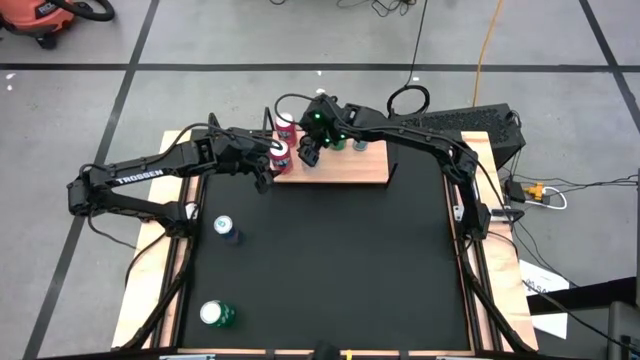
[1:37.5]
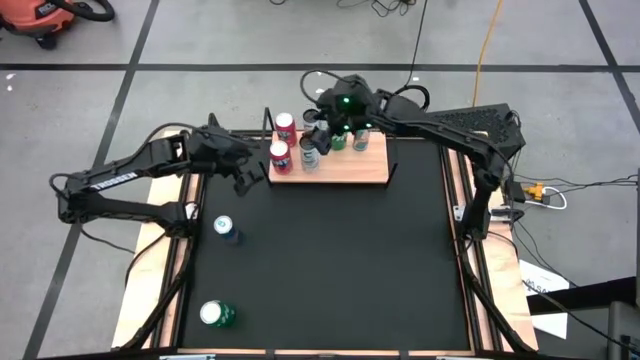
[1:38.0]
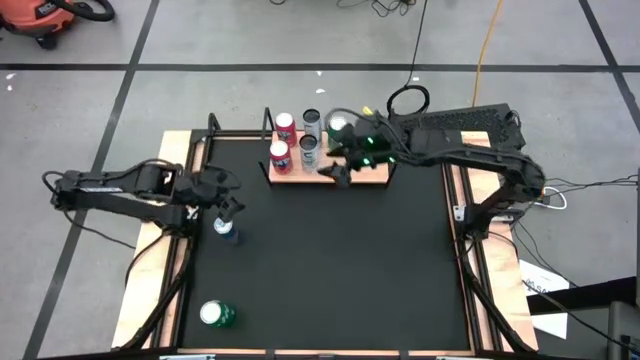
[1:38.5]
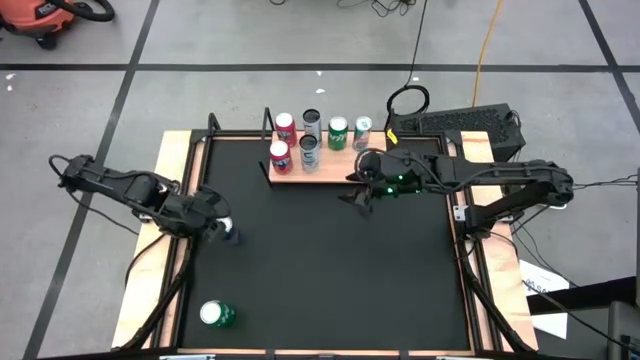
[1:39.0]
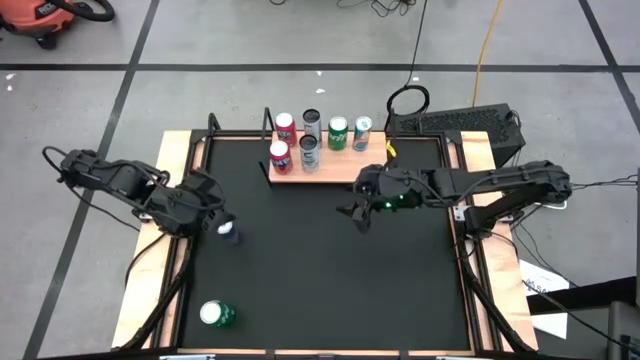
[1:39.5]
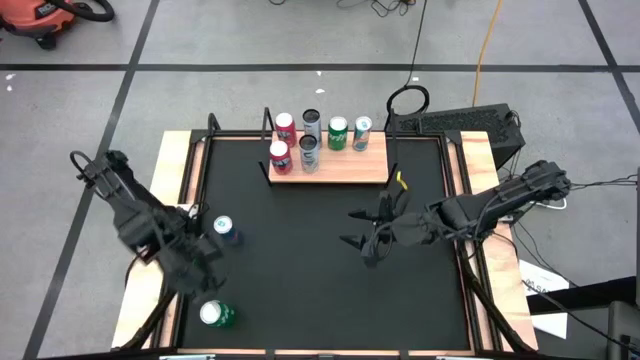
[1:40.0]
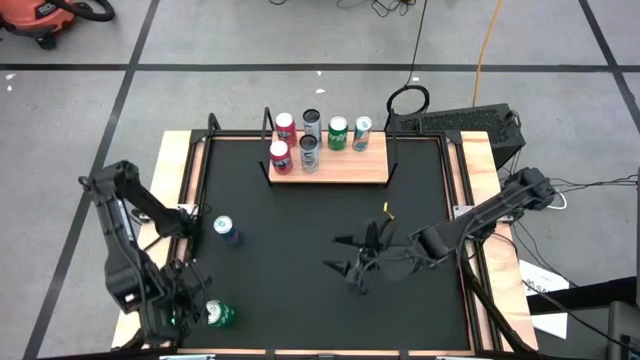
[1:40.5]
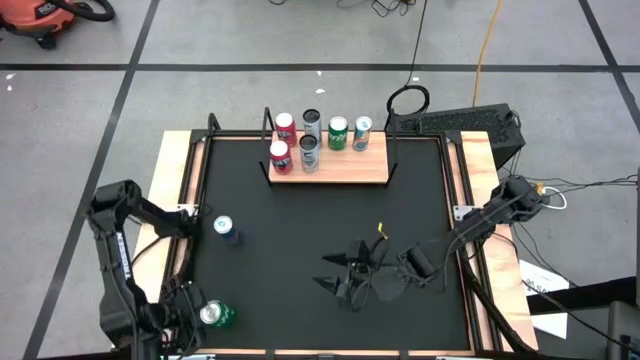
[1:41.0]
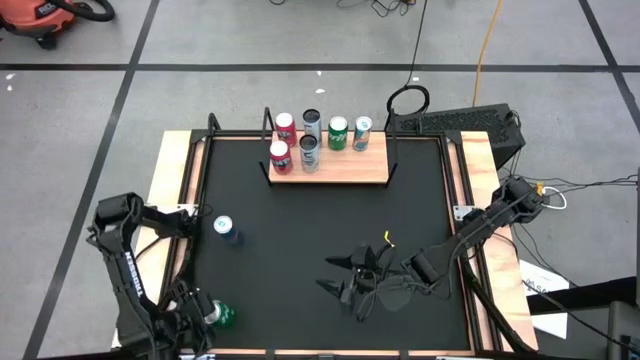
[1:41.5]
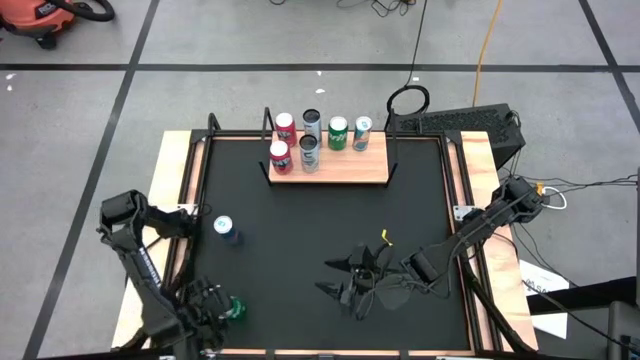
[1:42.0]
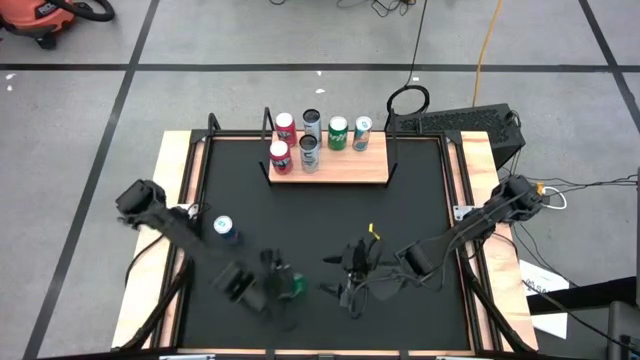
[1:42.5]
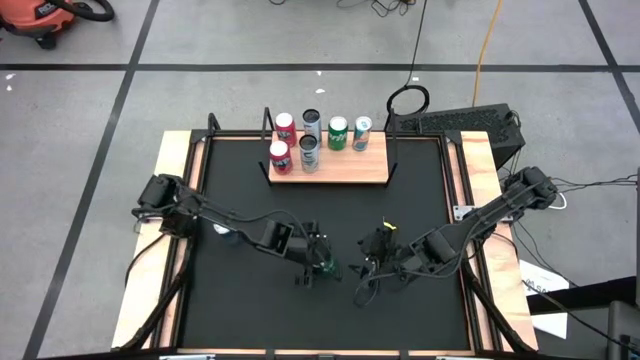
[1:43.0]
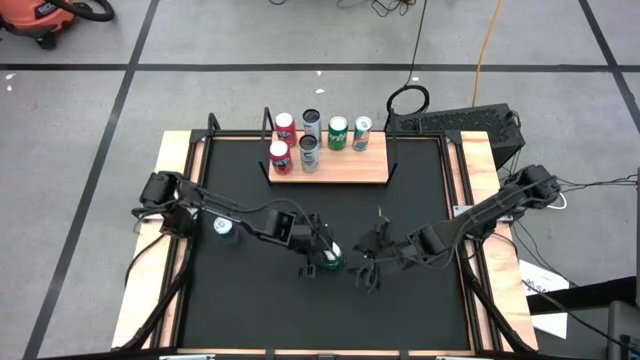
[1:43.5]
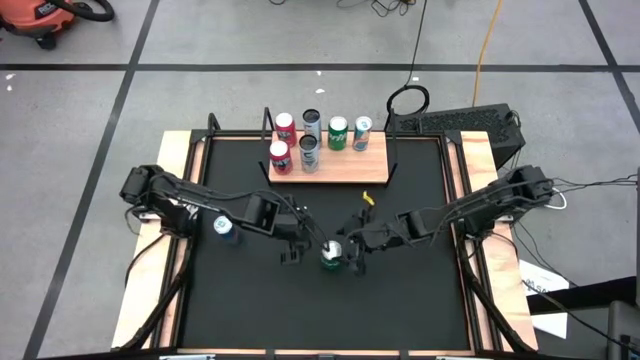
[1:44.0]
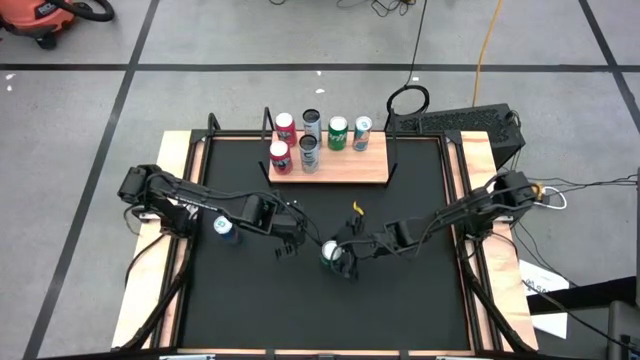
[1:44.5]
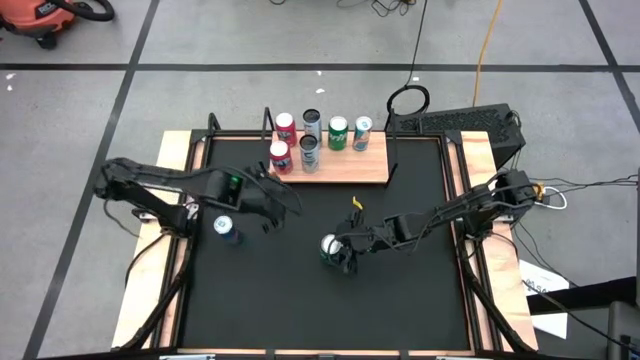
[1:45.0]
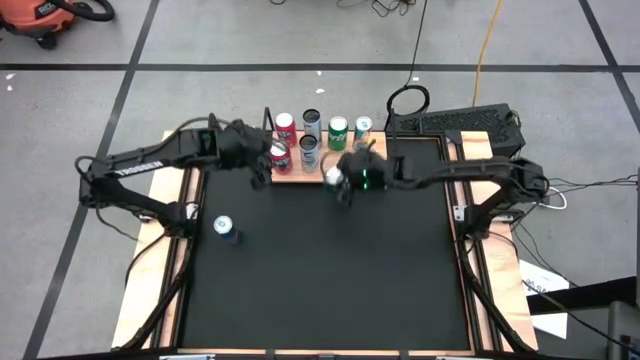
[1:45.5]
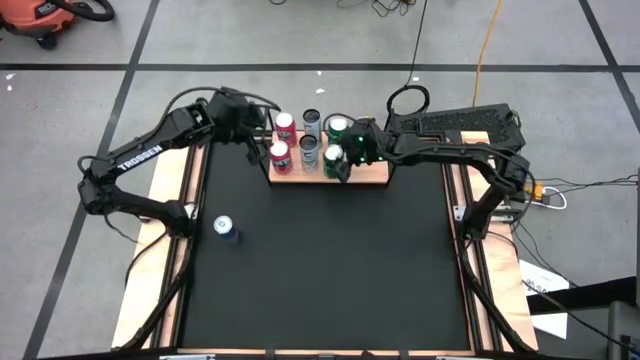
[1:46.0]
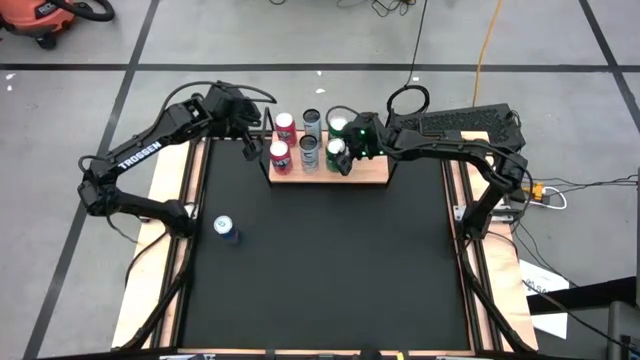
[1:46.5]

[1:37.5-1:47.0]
Task: Place canned beverage on shelf
Put the green soda can on the shelf aligned with the other green soda can

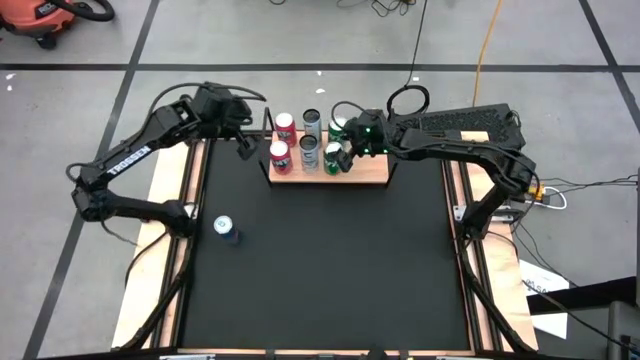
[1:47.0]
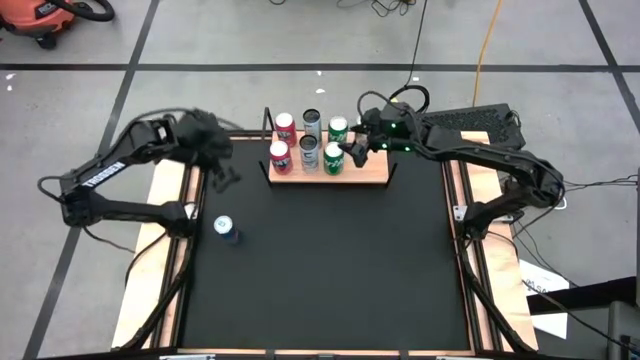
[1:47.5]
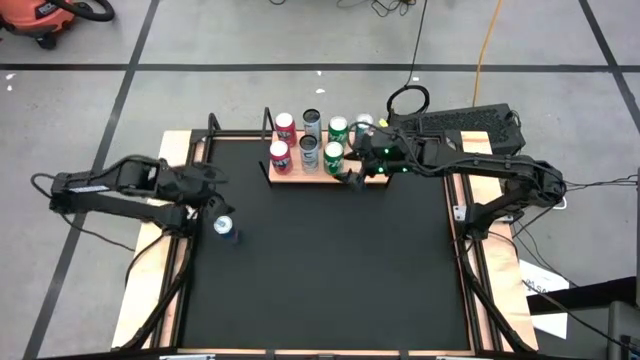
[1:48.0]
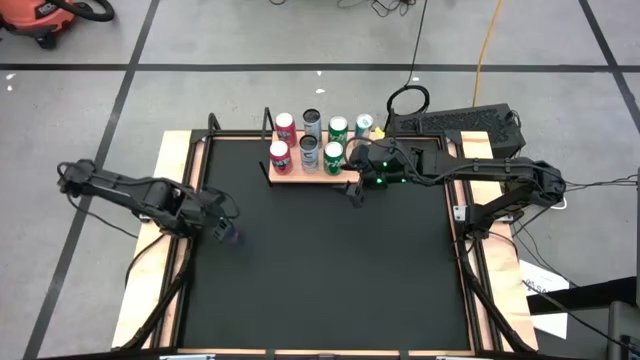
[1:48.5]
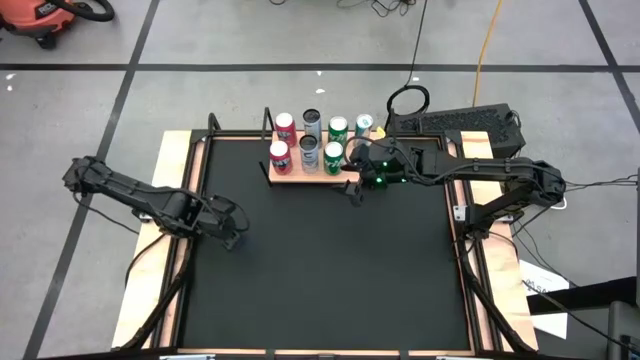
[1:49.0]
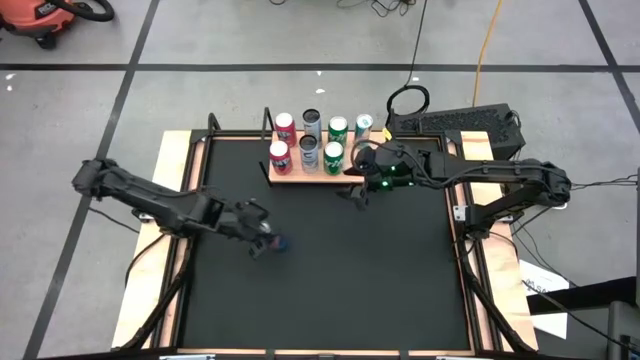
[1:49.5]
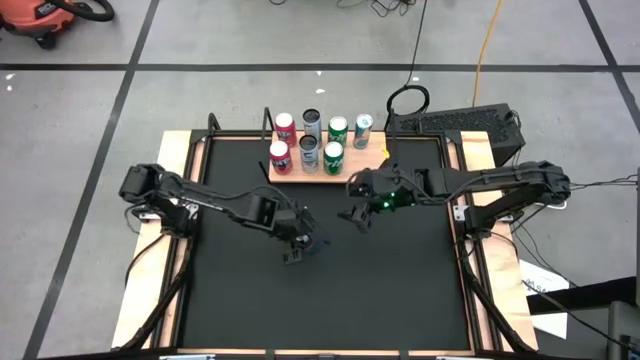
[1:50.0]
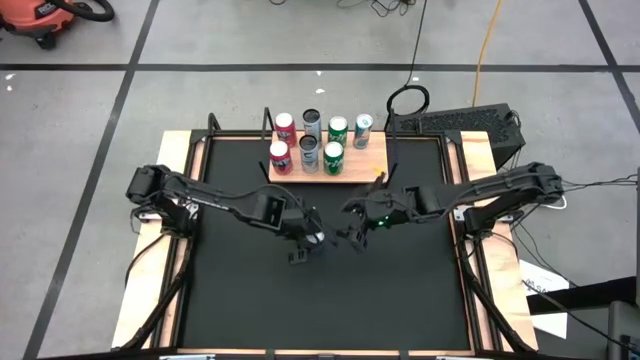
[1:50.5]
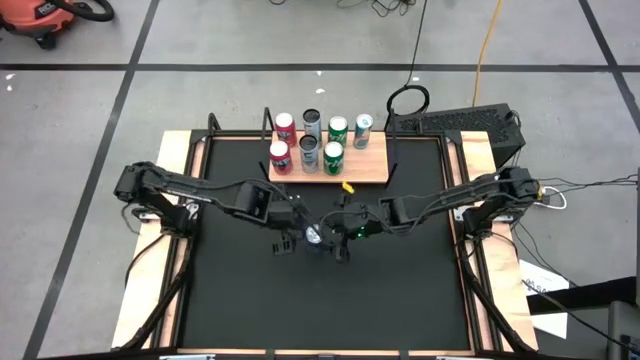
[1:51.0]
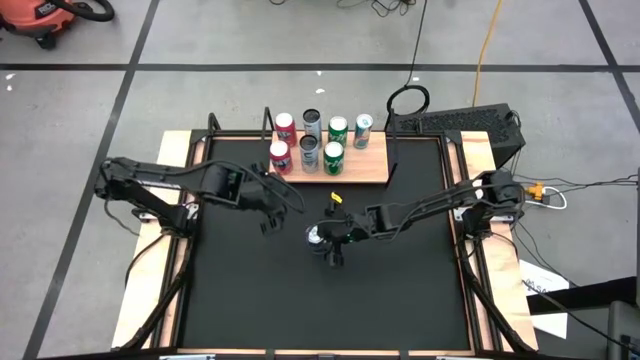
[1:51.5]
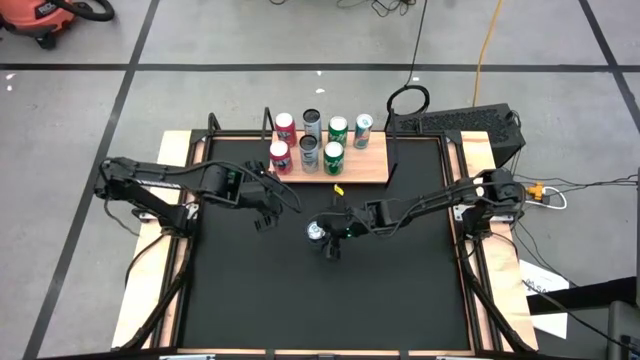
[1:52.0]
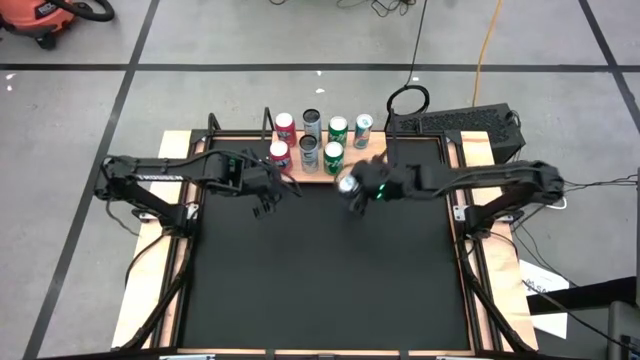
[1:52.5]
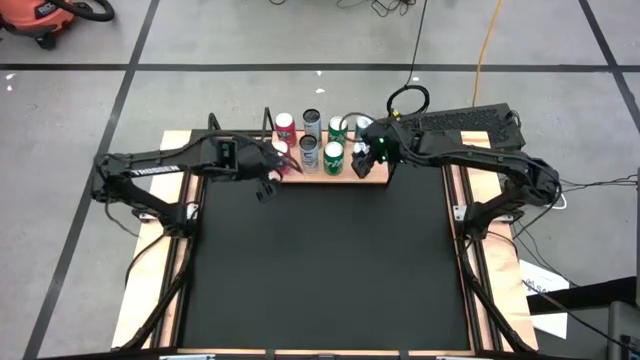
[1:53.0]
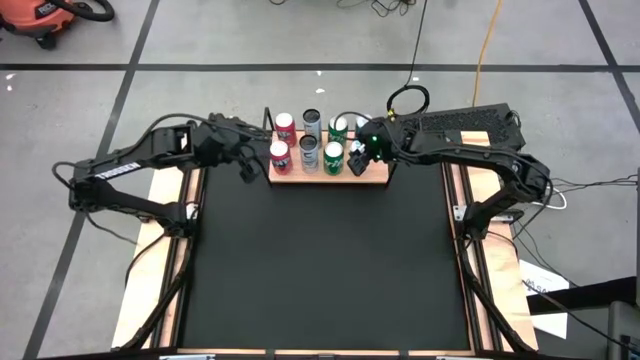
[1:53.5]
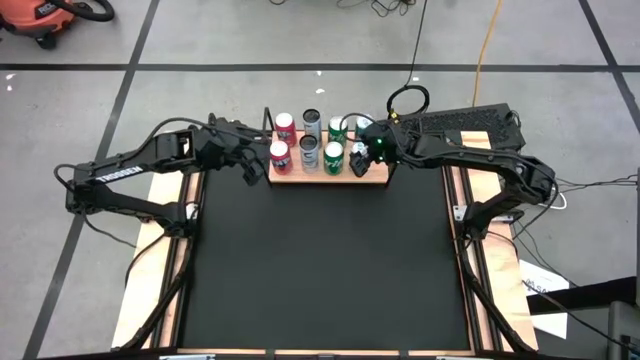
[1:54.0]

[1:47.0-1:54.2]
Put the blue soda can on the shelf aligned with the other blue soda can

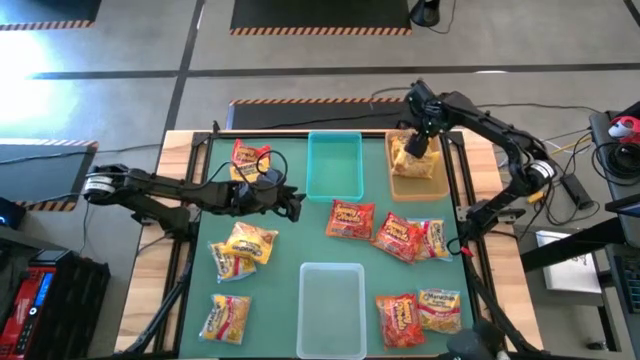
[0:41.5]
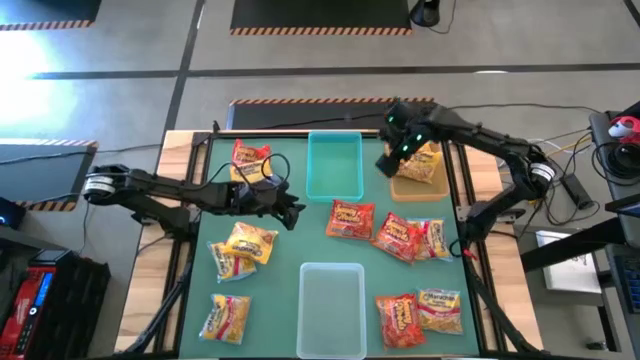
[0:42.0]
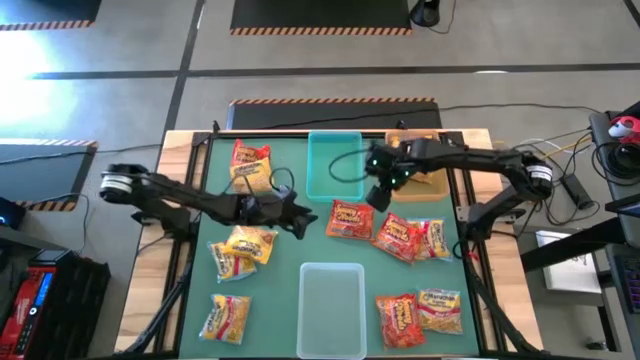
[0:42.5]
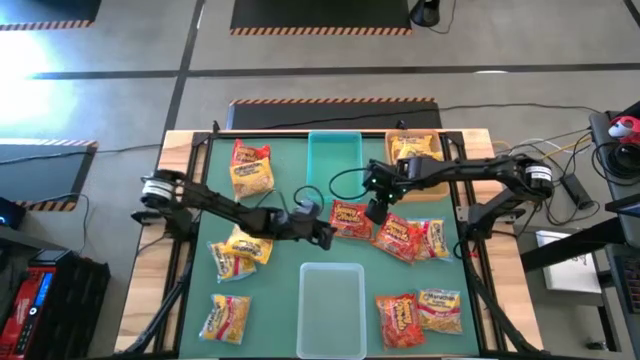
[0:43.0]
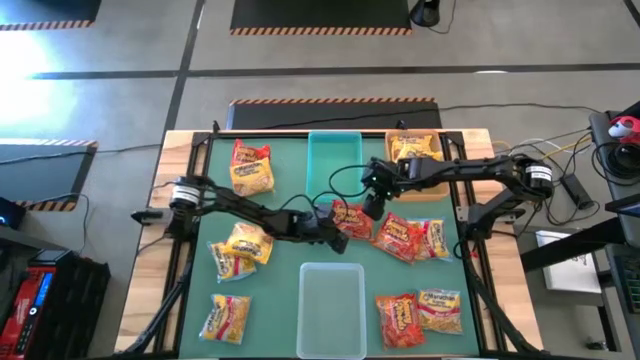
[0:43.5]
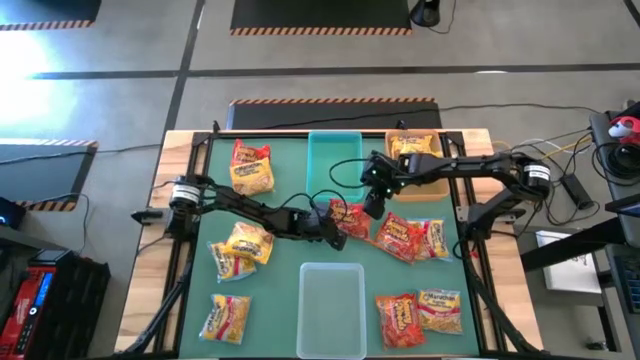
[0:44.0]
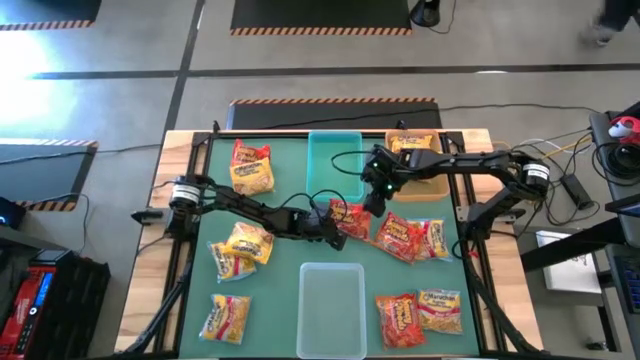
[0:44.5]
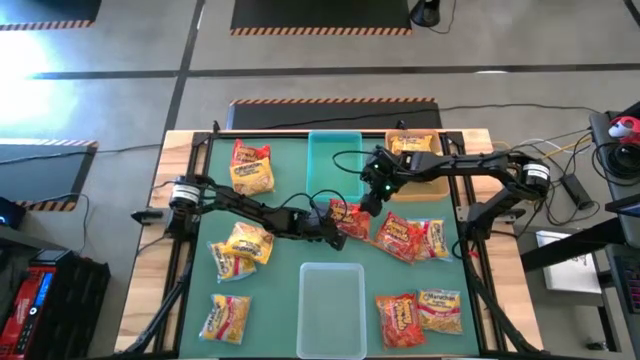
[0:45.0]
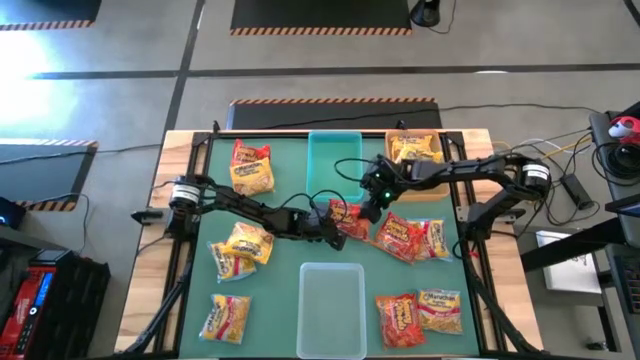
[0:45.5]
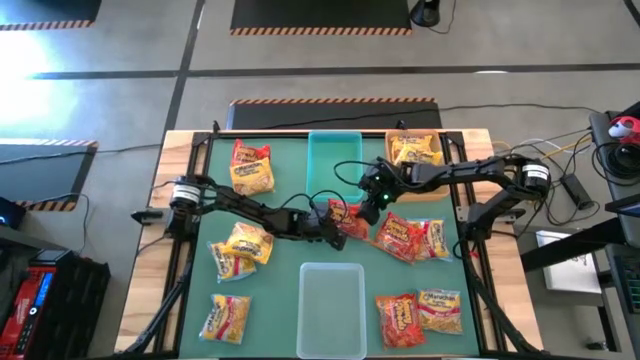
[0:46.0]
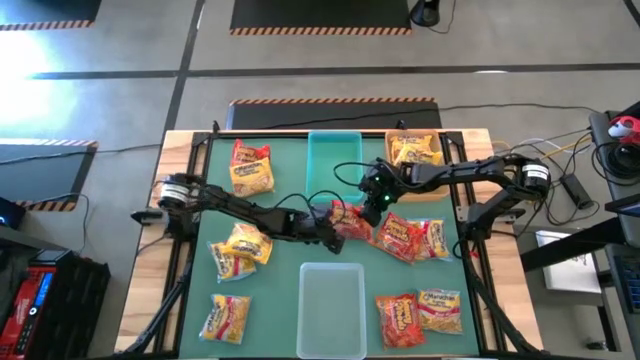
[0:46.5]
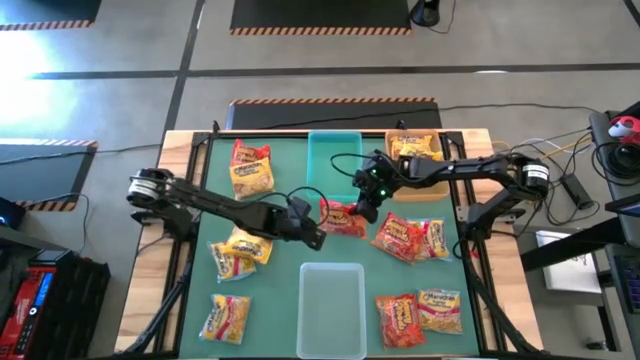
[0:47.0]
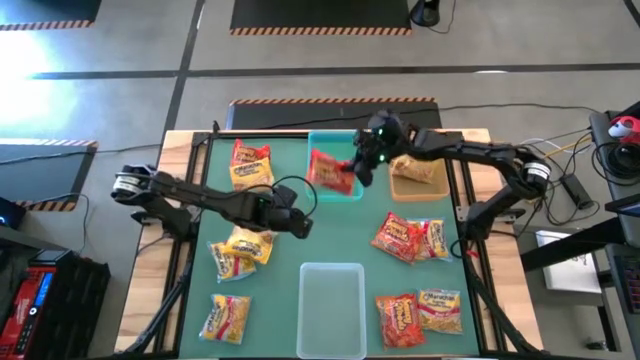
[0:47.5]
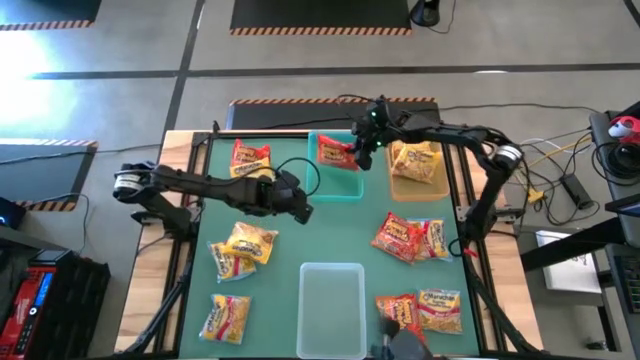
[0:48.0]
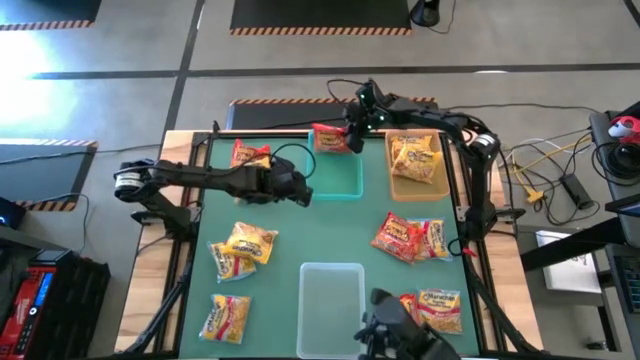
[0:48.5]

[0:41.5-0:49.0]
Task: Sort Maruchan noodles
Put the red noodle pack into the green bin
